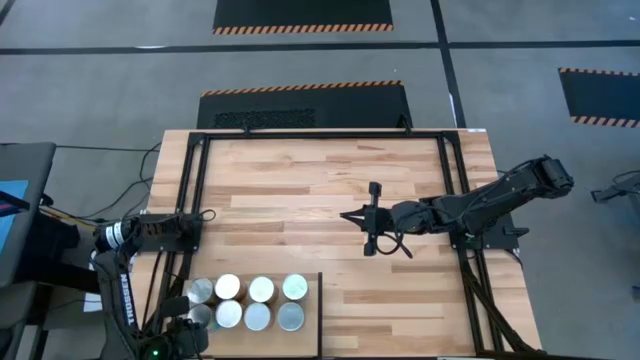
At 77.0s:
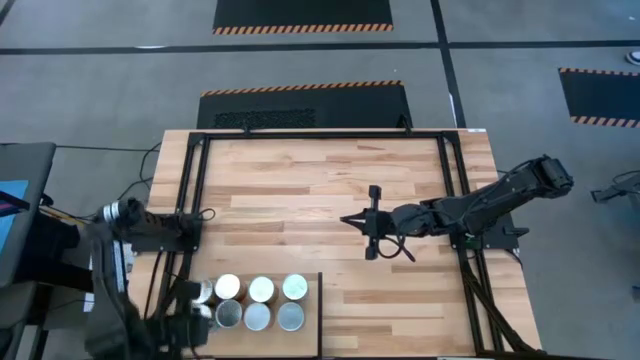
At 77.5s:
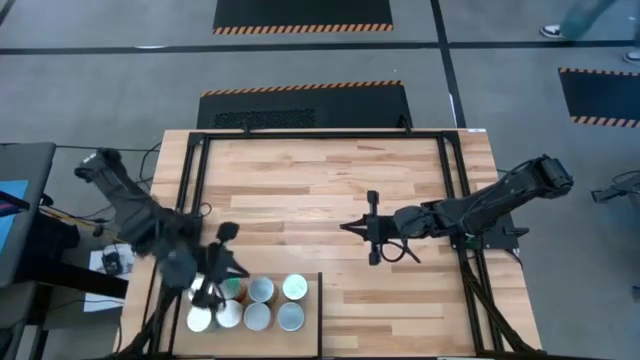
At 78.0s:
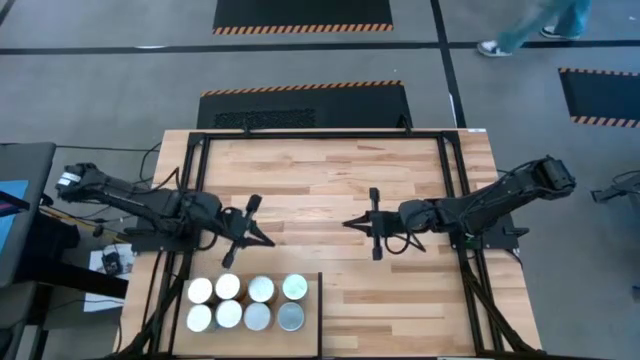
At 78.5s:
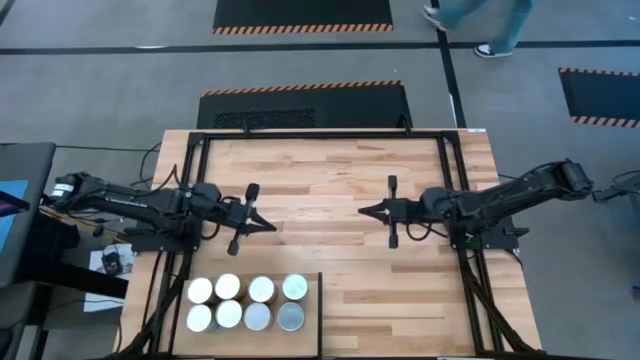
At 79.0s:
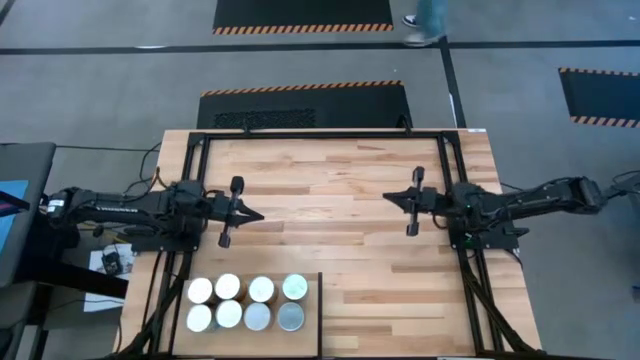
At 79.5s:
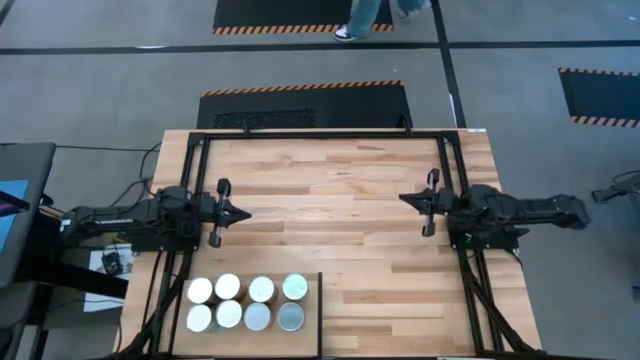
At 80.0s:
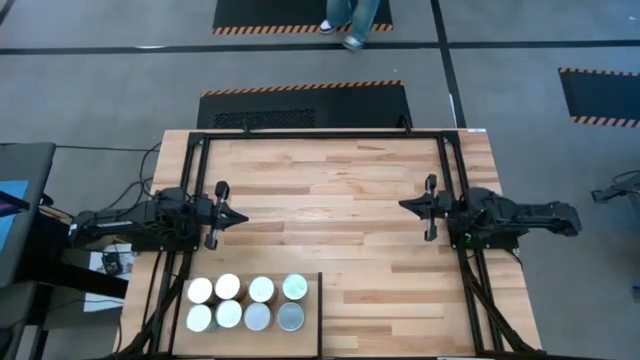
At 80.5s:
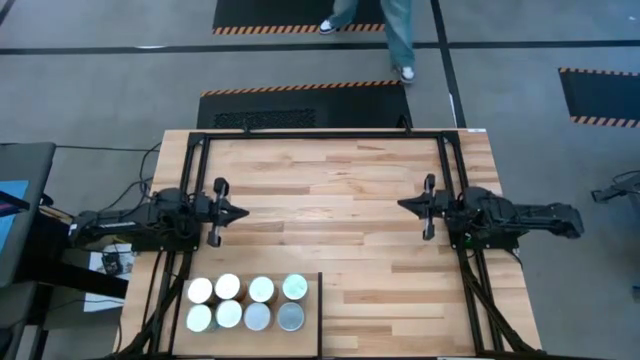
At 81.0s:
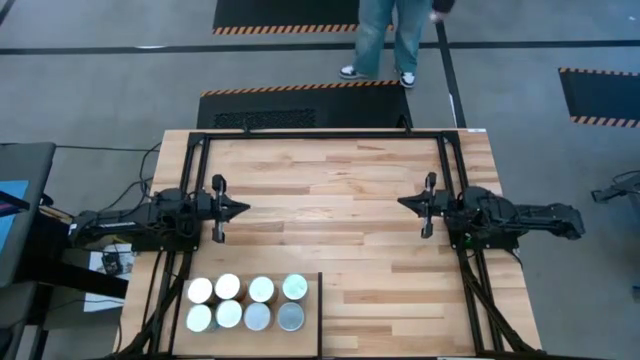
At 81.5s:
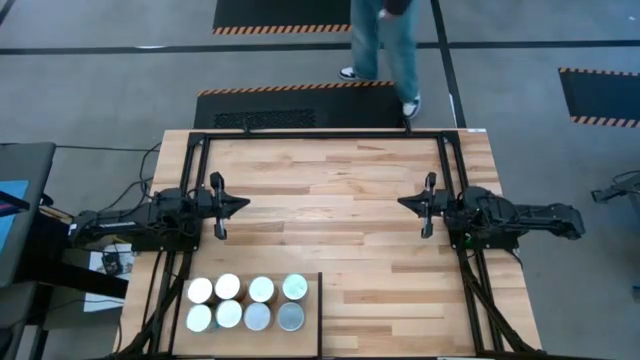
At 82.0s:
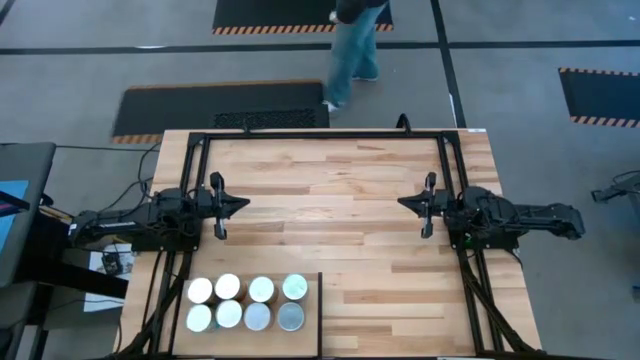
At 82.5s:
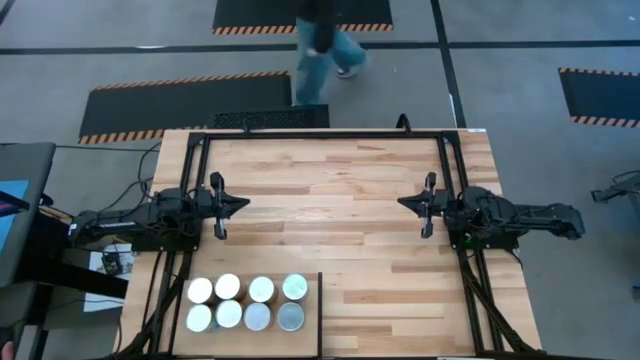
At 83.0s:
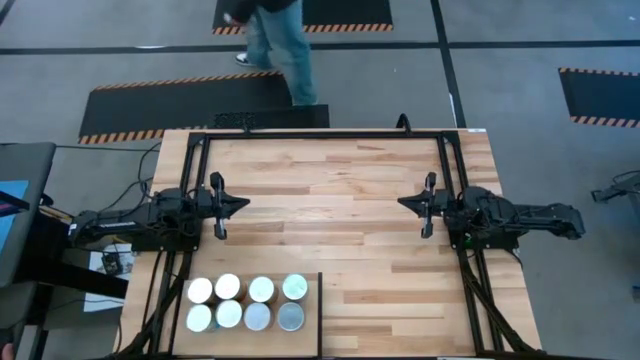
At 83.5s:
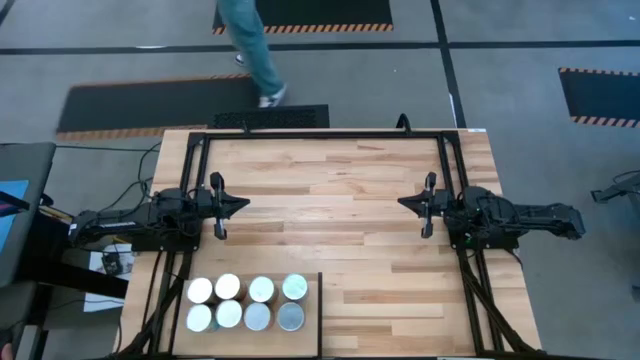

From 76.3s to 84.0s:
Task: Pick and place cans onto a shelf
Return to Home Position

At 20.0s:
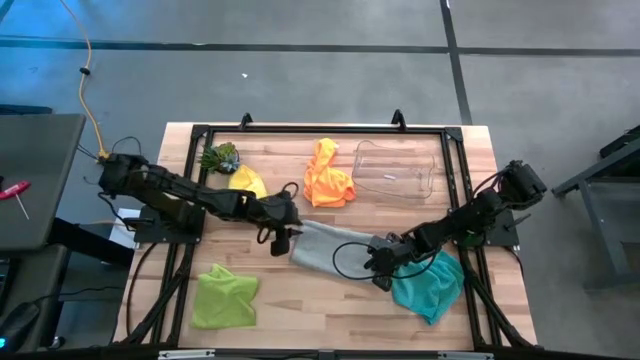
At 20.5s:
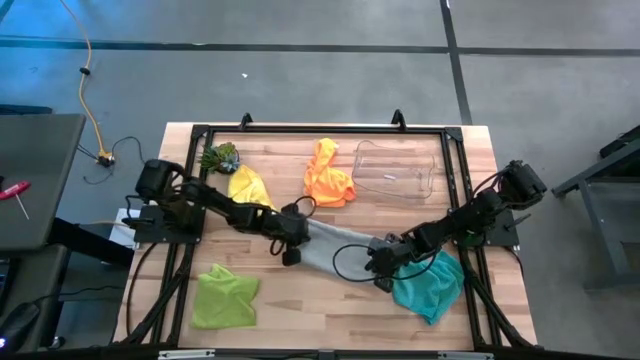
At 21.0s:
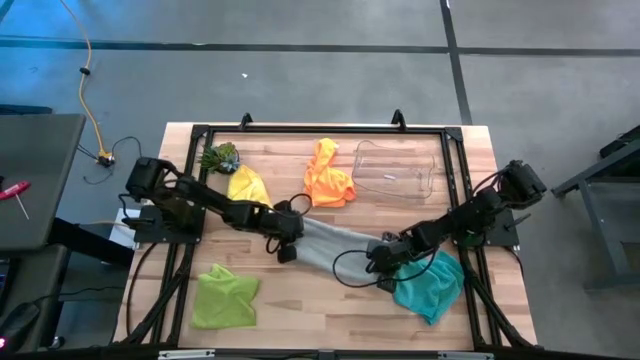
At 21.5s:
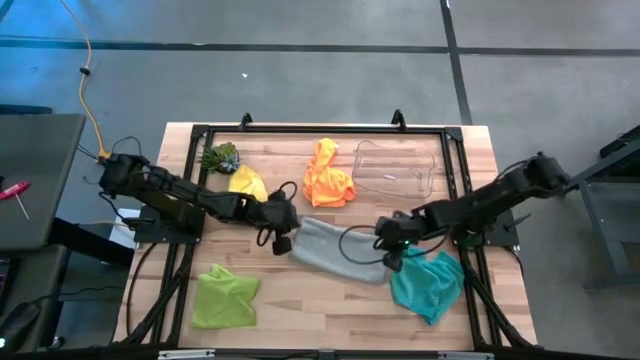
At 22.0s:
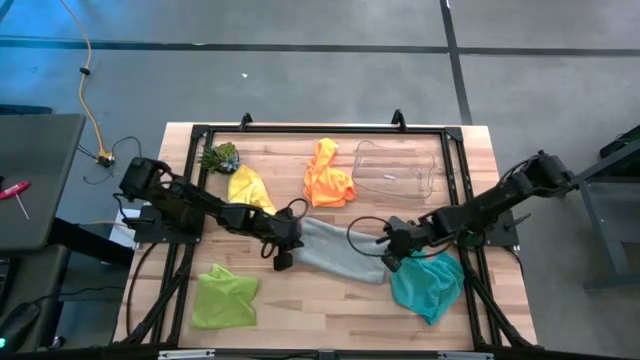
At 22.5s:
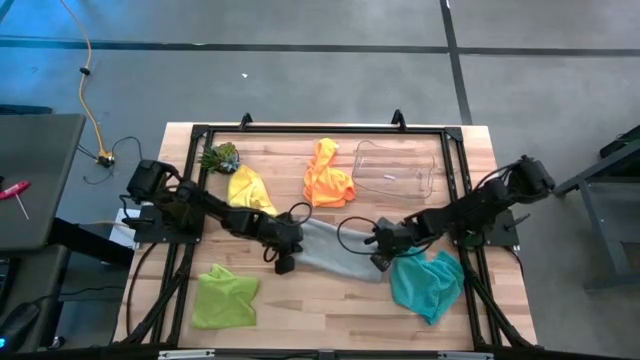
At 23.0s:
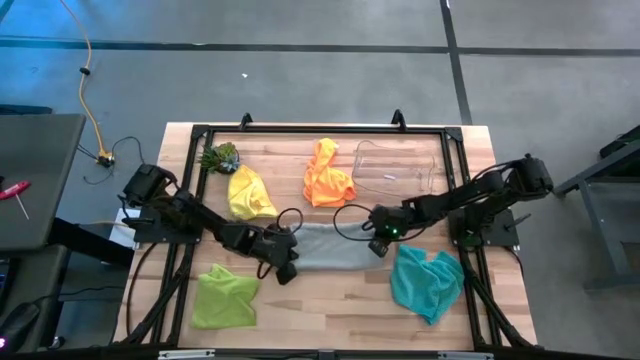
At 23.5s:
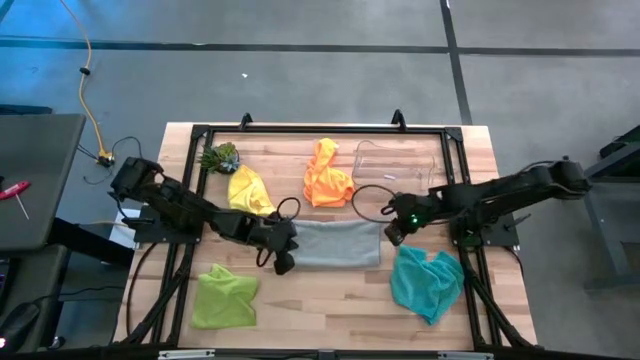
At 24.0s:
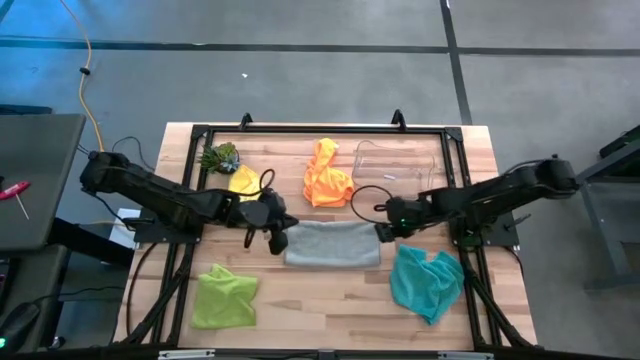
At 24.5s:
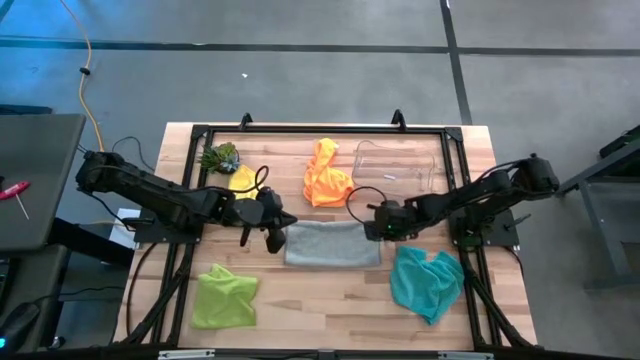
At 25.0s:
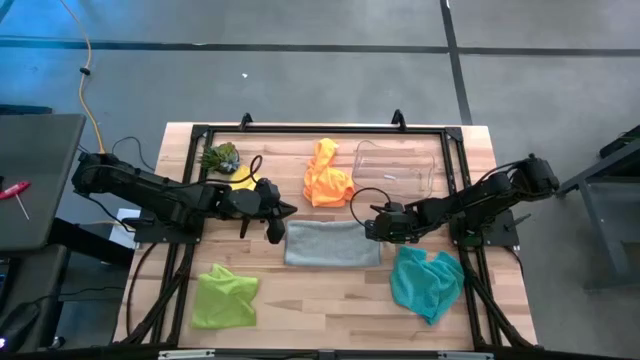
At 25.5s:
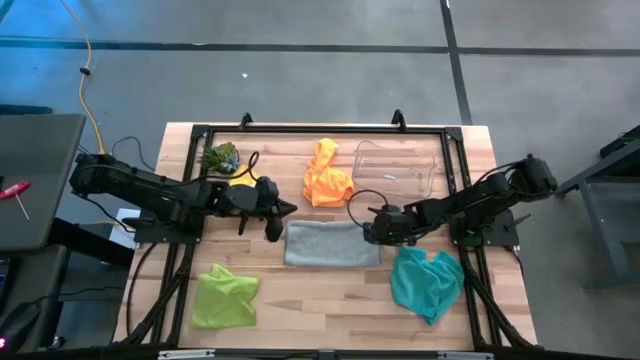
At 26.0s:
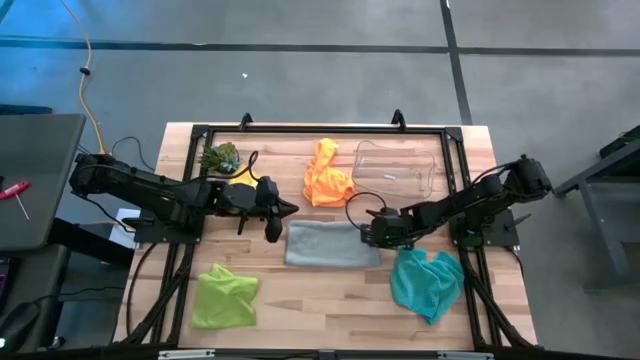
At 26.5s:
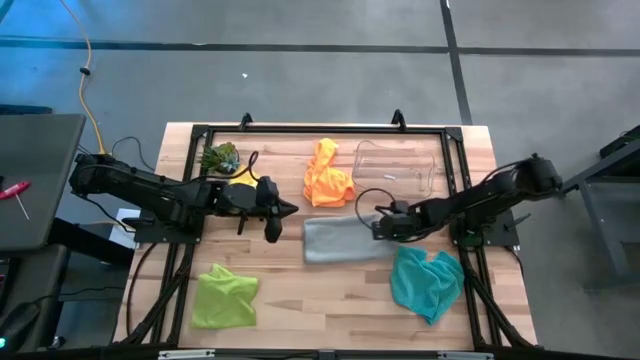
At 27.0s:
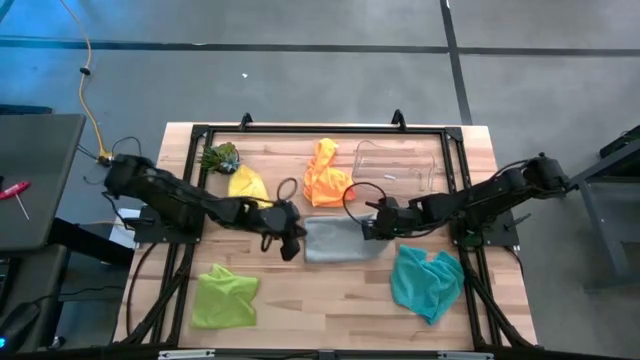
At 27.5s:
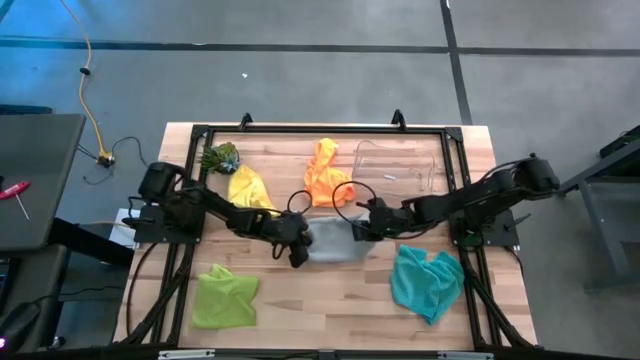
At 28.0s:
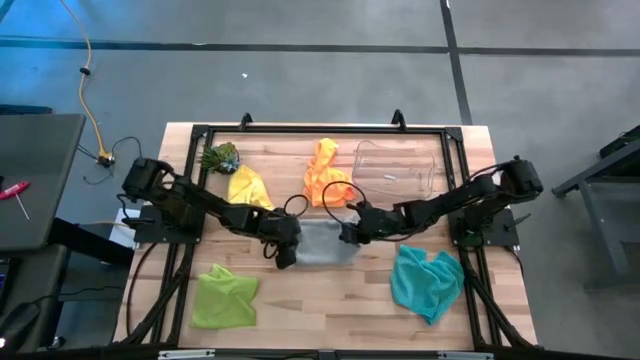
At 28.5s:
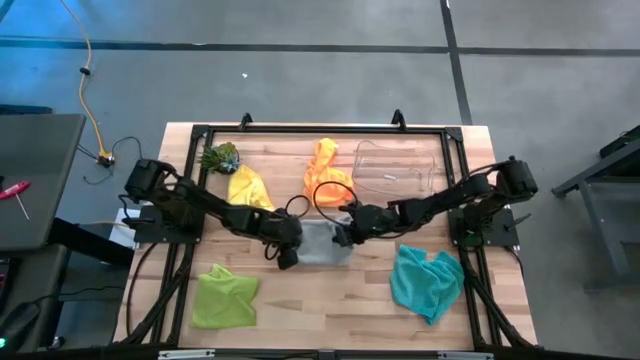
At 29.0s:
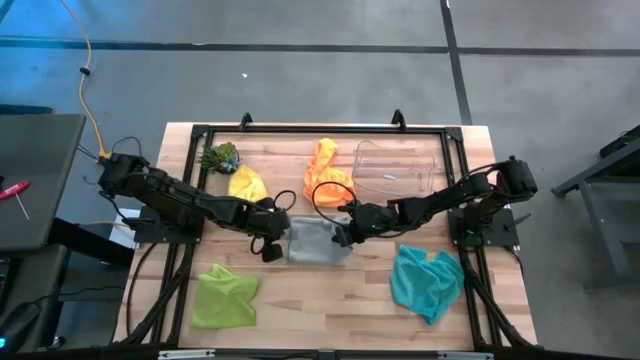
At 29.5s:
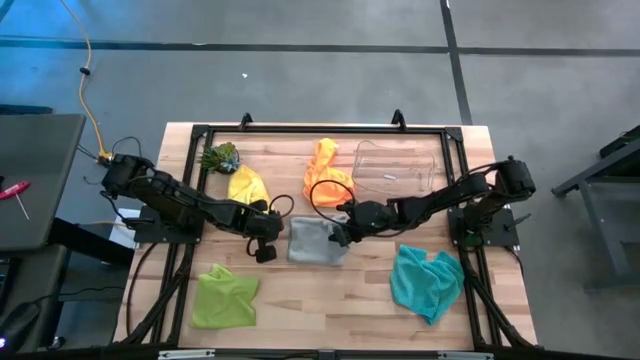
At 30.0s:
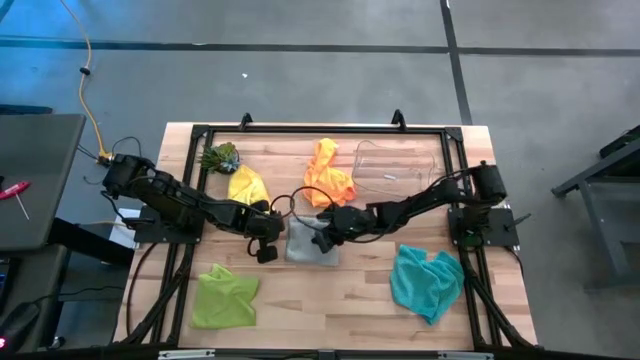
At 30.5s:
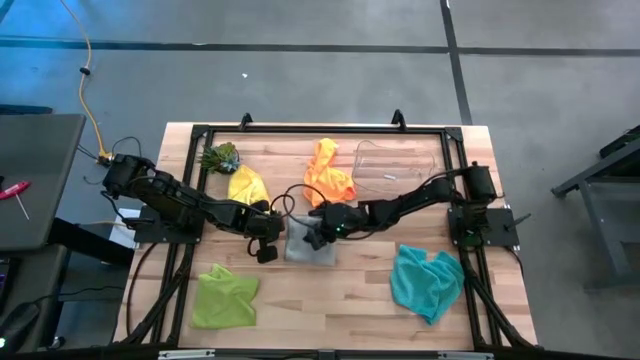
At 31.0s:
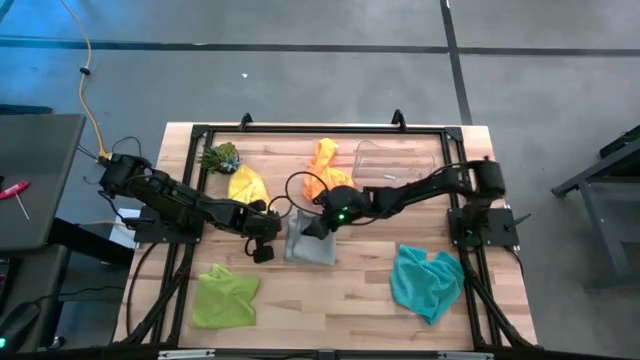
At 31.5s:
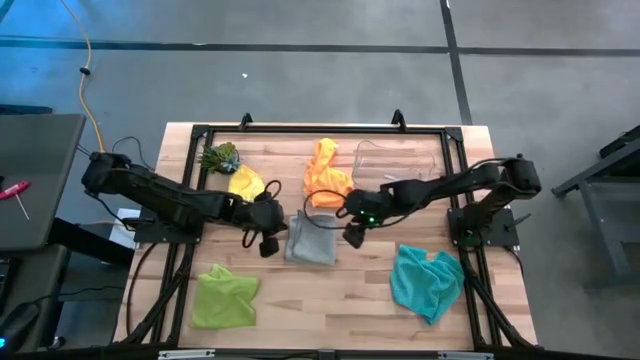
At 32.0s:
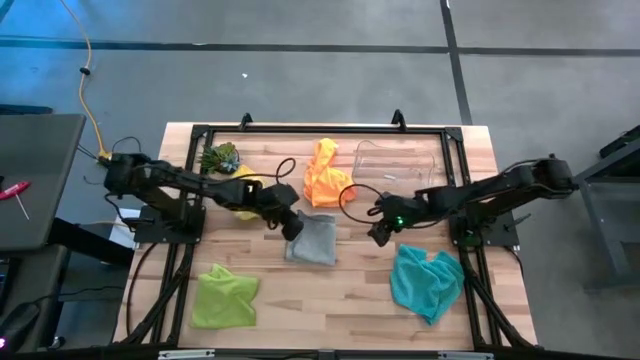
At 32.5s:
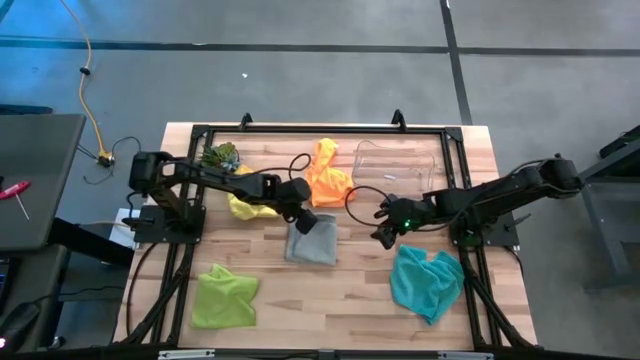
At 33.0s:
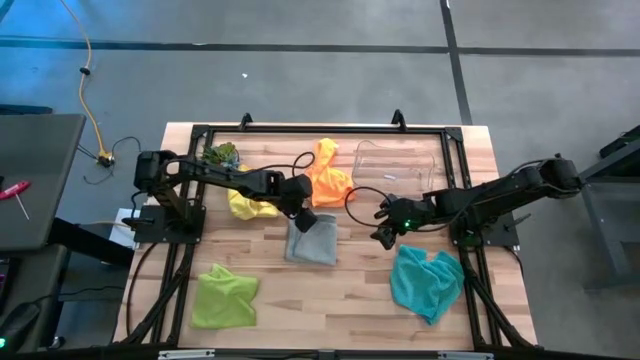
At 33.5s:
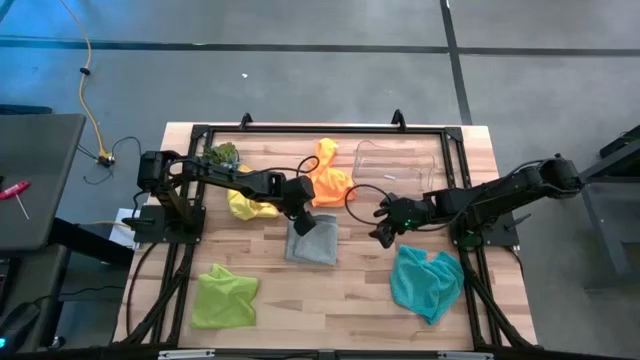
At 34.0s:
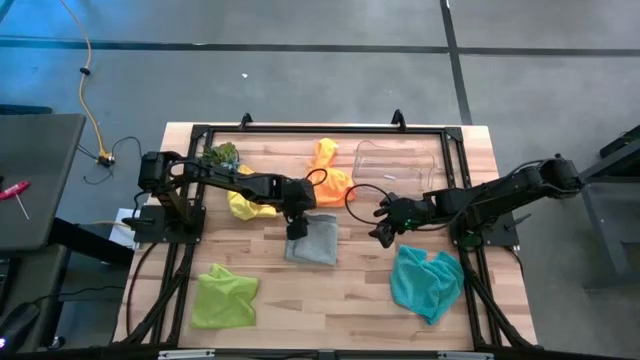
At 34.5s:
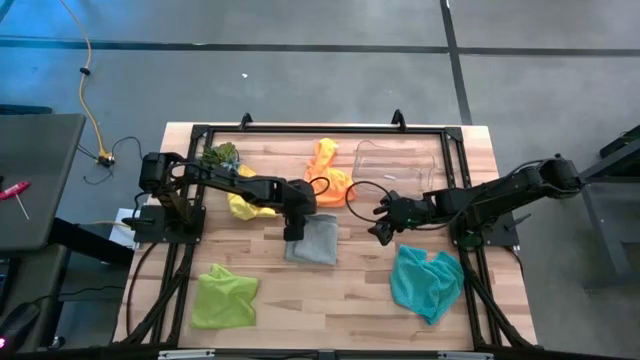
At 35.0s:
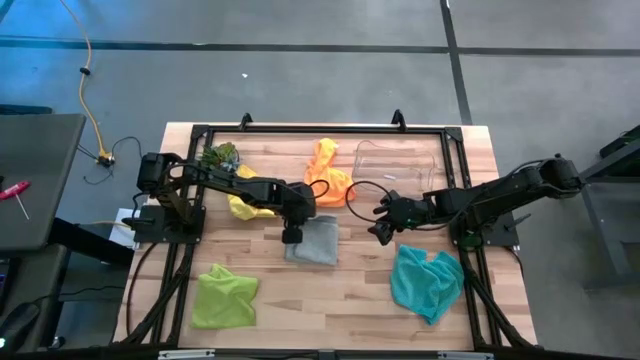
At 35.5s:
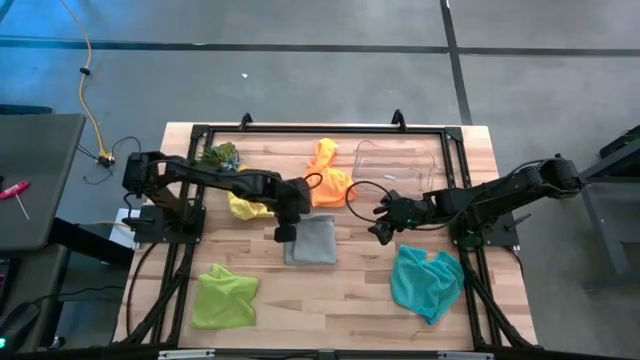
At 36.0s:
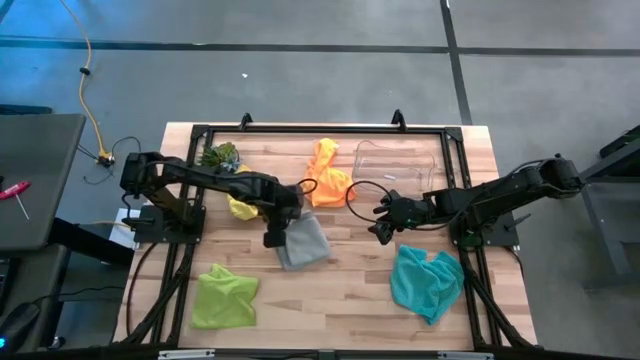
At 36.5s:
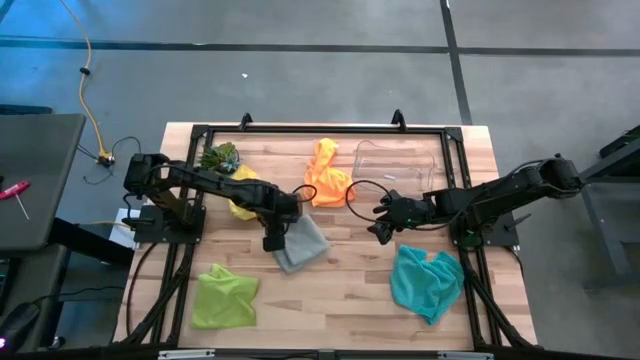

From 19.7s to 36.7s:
Task: Fold microfiber towels
Fold the gray microfiber towel
